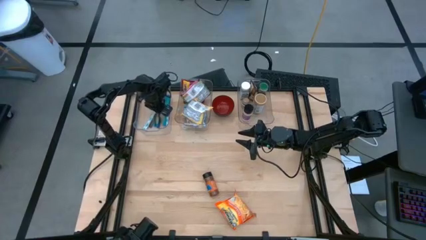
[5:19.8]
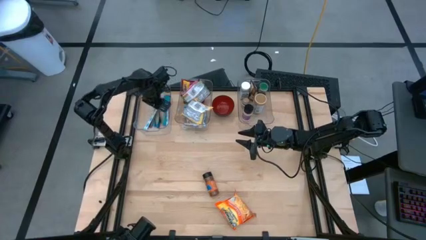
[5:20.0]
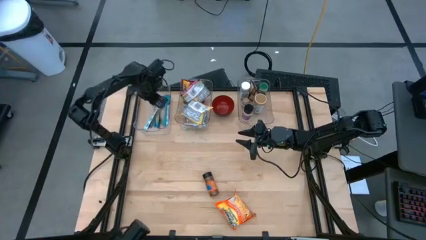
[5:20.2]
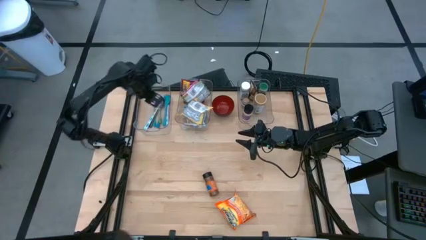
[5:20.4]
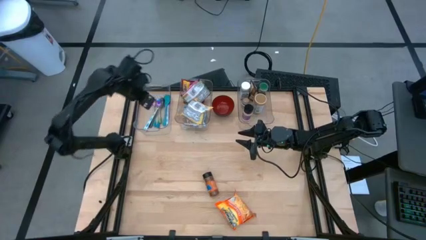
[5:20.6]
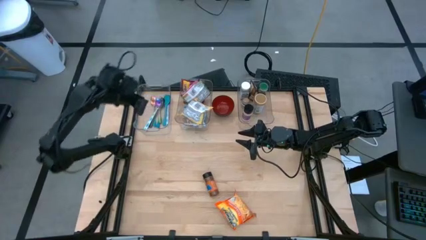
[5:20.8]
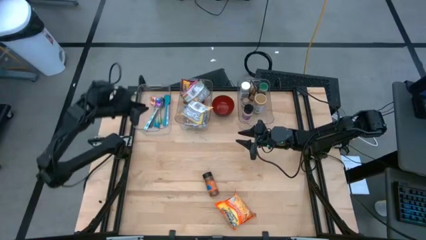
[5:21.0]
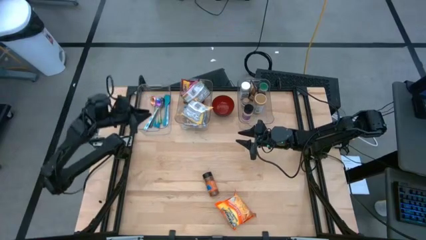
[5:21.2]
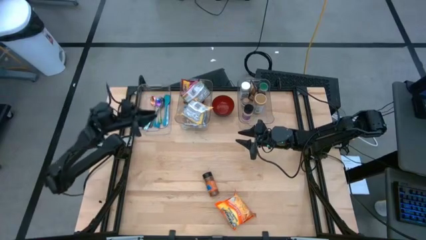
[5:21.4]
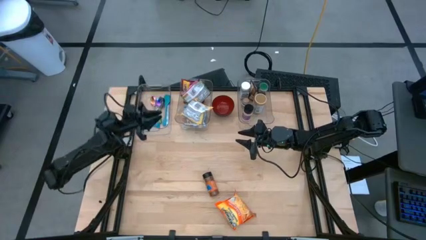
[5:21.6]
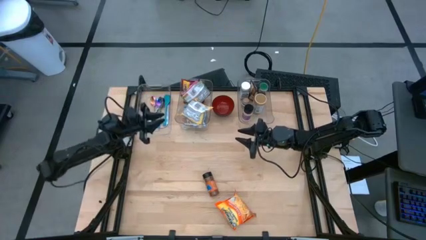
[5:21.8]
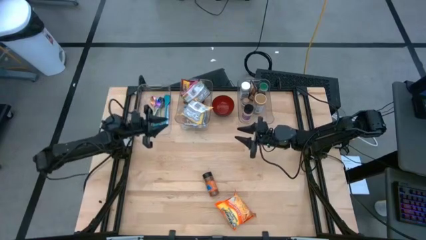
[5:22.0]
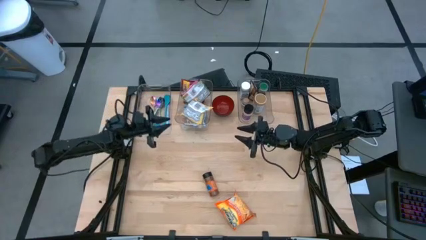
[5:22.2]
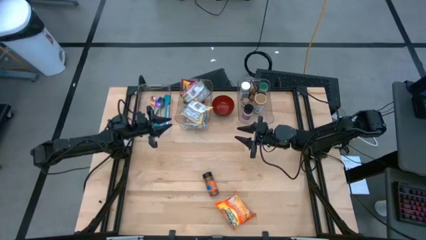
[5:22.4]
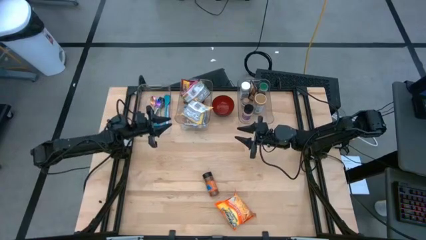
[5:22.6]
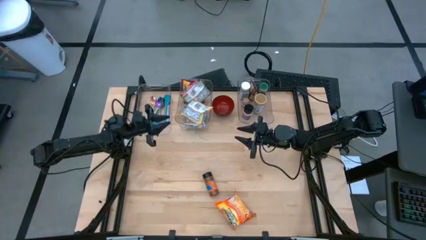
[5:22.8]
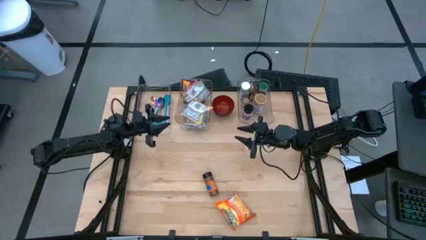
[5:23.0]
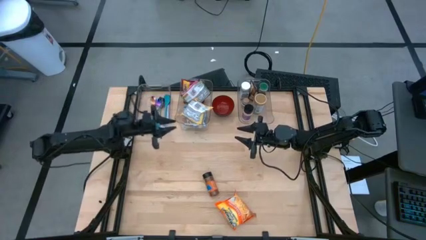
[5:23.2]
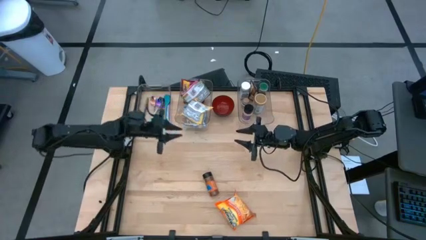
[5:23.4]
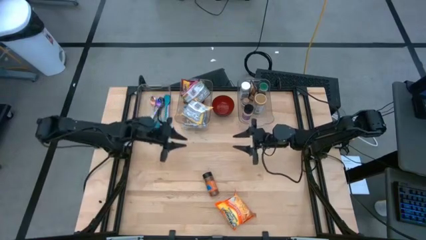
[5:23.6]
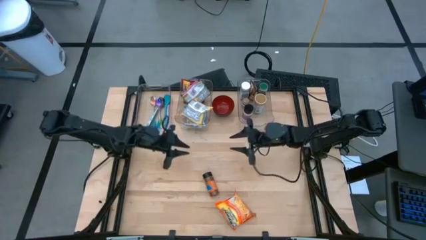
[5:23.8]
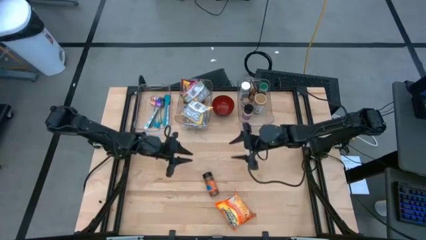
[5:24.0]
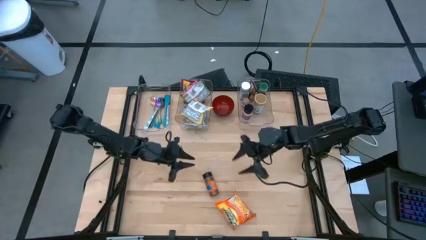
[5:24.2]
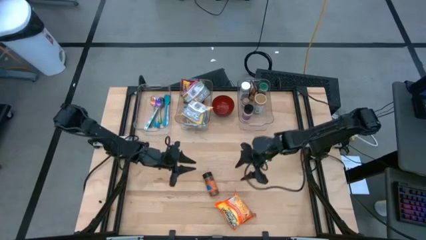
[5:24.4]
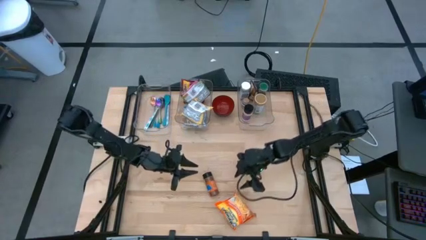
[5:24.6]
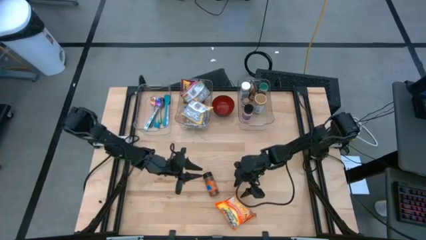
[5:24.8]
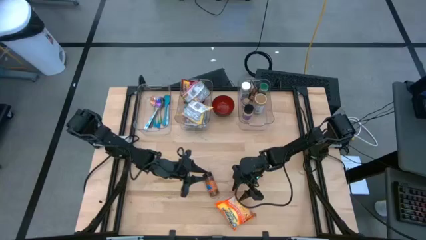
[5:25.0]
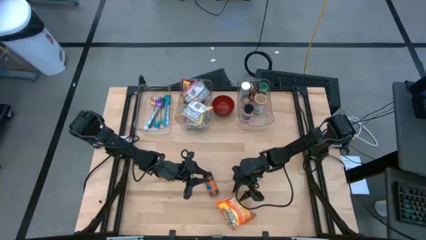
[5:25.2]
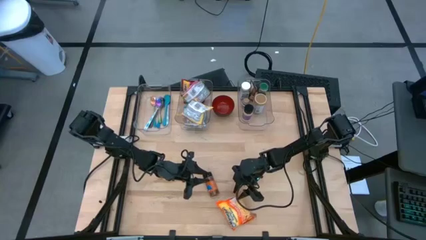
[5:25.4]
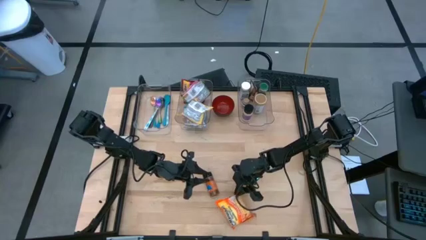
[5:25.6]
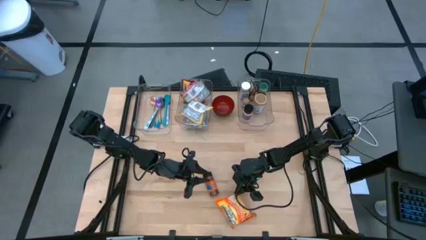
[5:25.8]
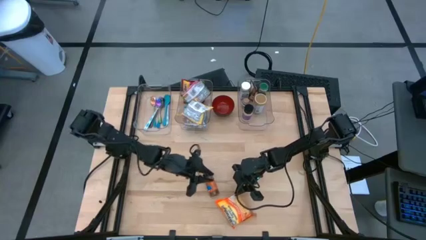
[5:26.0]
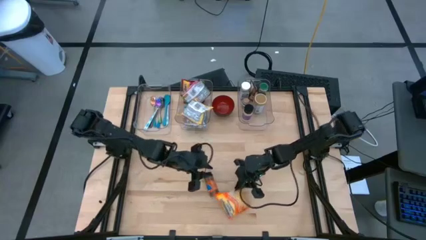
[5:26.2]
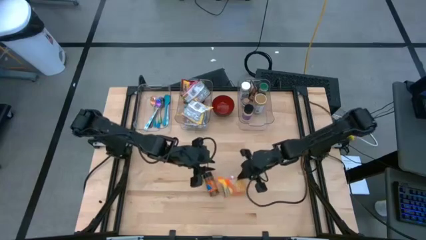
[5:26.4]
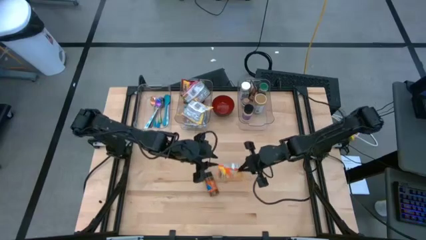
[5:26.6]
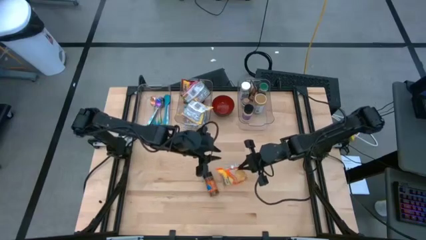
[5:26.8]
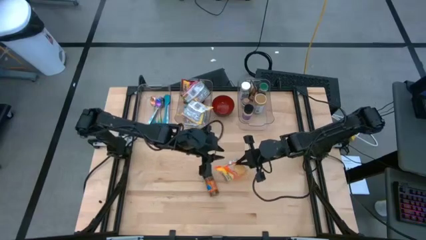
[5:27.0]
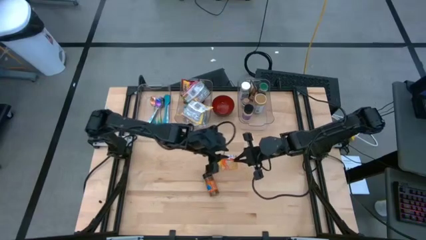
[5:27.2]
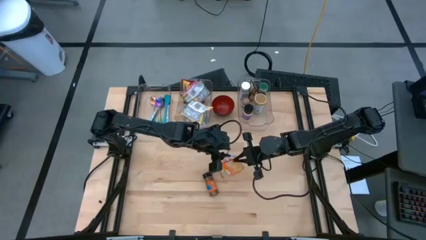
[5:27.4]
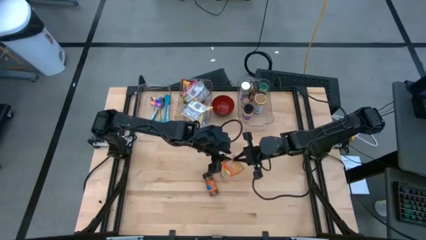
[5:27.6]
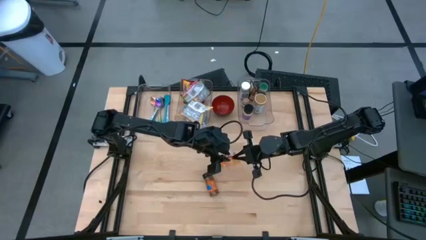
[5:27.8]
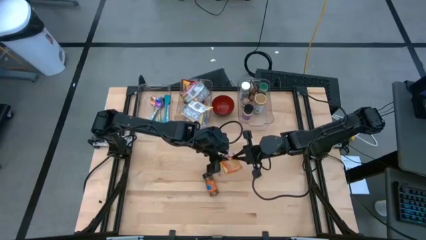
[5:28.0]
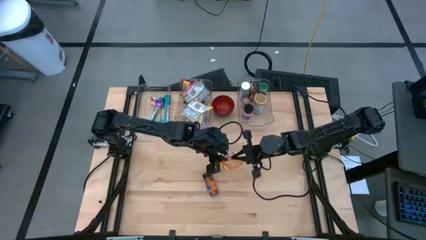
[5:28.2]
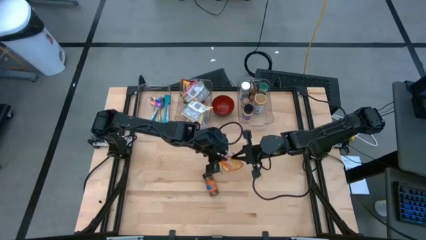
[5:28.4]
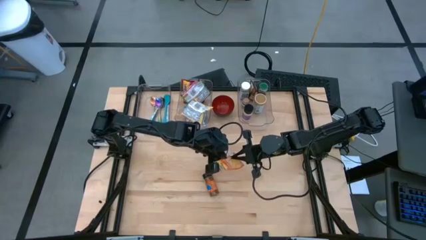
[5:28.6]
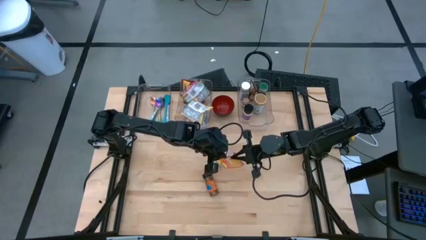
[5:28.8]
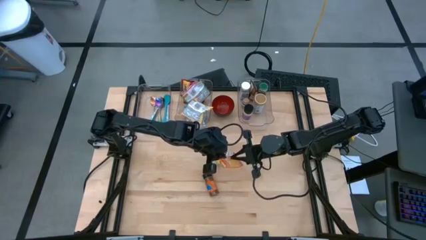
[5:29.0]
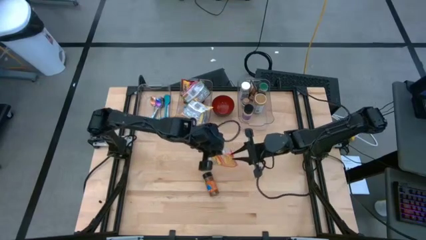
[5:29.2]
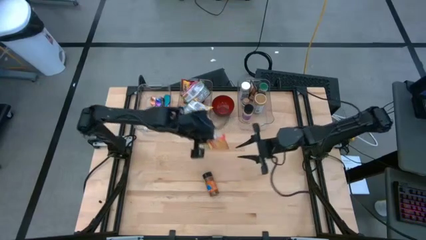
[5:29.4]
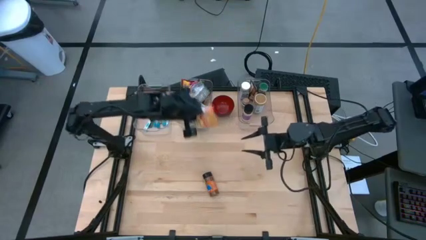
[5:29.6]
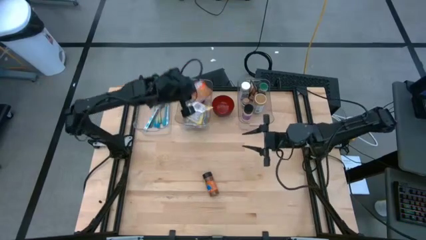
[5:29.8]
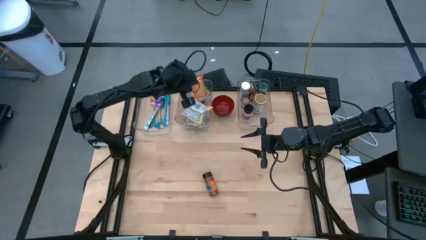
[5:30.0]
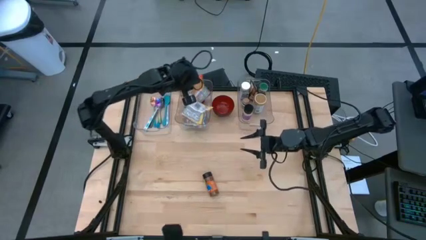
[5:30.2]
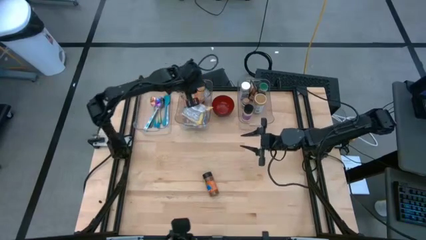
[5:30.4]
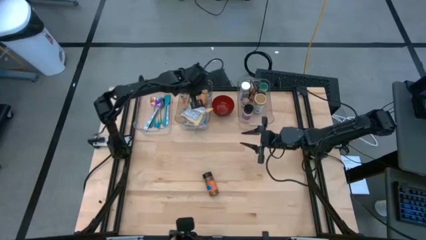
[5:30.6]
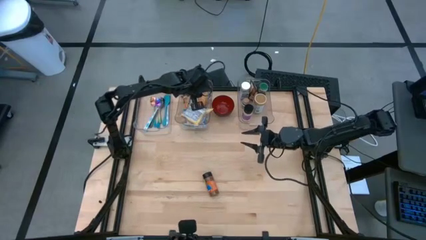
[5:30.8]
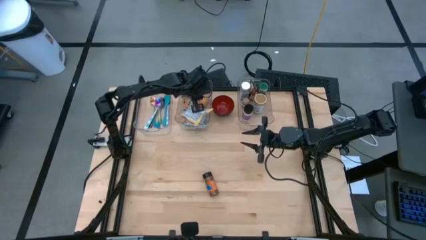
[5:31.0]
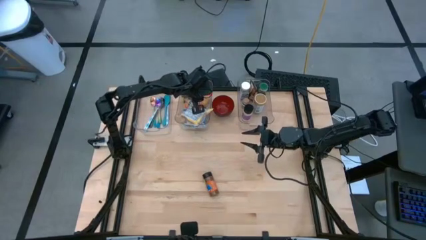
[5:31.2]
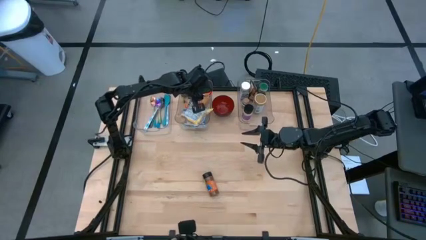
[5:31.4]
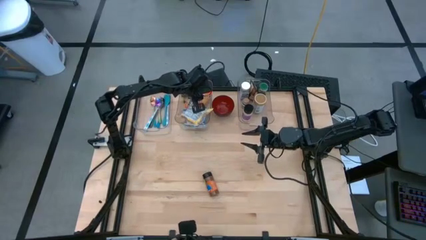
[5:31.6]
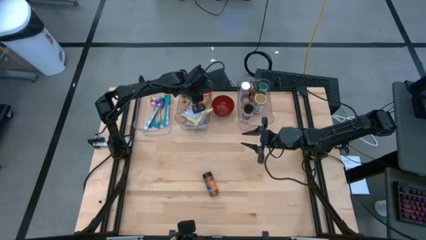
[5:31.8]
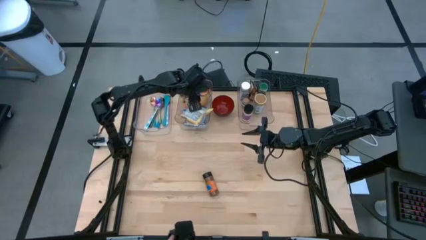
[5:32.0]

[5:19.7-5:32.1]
Task: Pick & Place Food Item
Put the orange noodle pack into the middle transparent bin

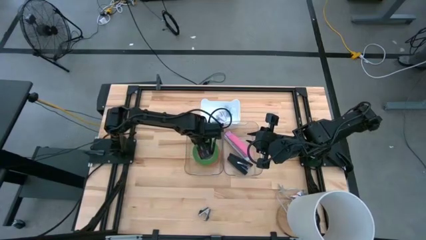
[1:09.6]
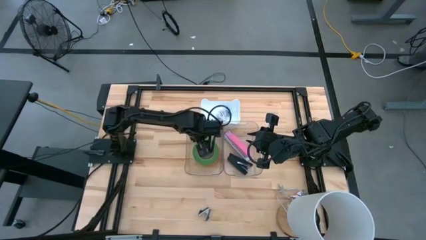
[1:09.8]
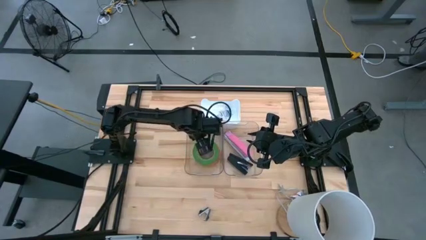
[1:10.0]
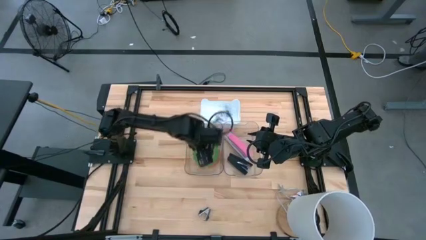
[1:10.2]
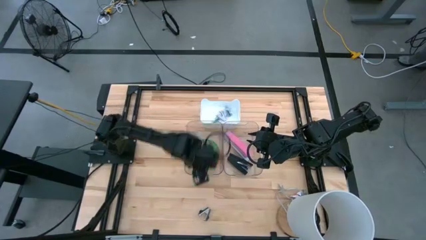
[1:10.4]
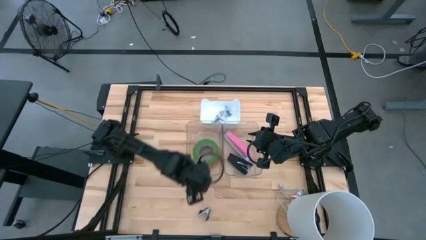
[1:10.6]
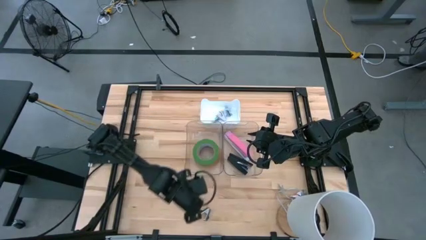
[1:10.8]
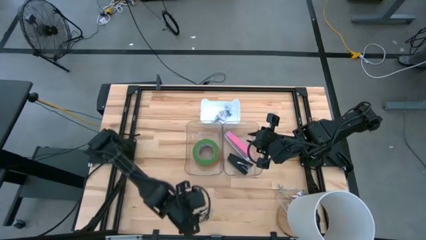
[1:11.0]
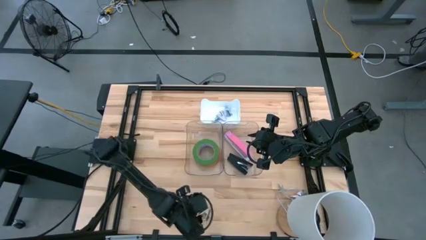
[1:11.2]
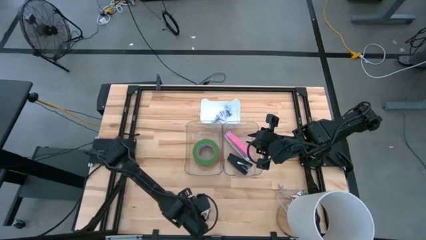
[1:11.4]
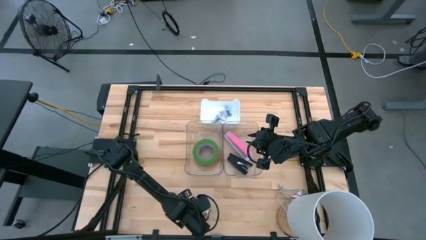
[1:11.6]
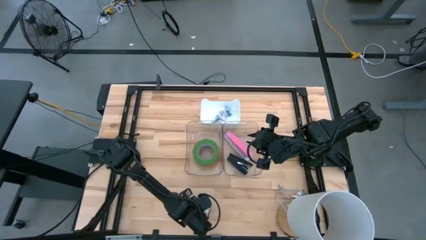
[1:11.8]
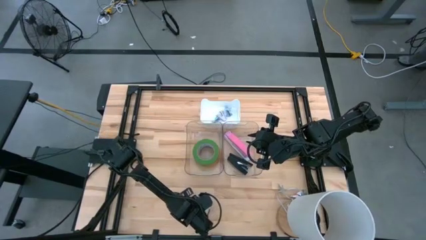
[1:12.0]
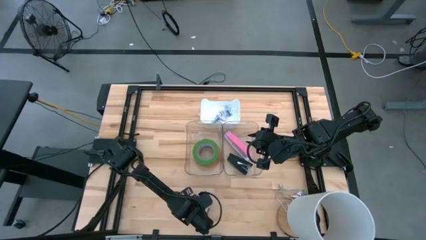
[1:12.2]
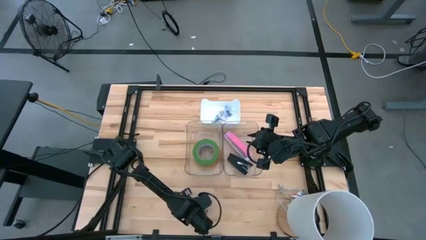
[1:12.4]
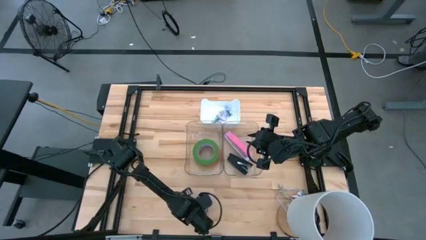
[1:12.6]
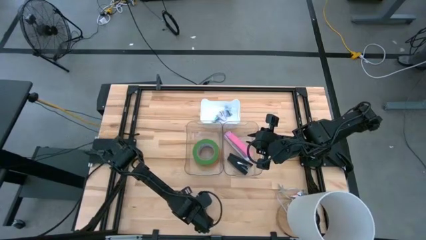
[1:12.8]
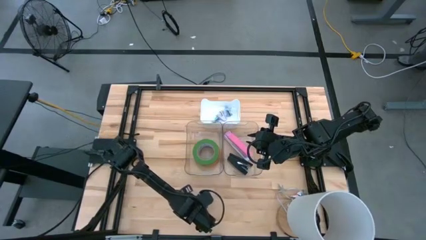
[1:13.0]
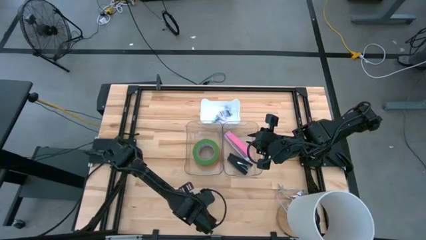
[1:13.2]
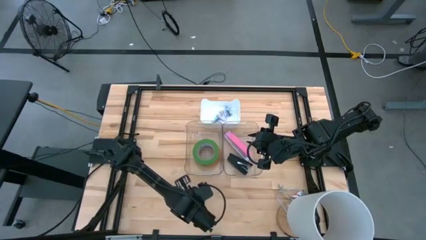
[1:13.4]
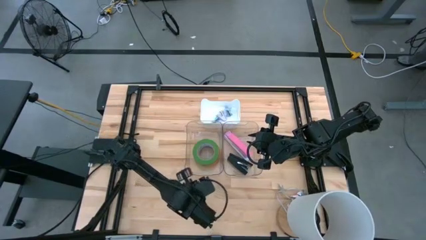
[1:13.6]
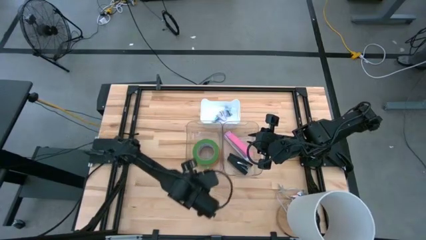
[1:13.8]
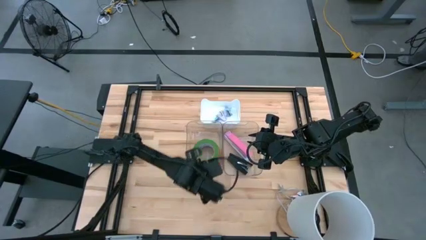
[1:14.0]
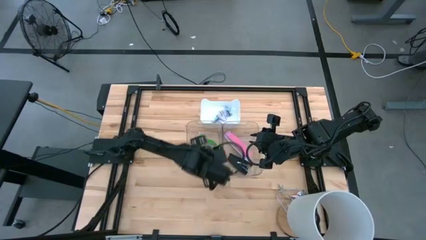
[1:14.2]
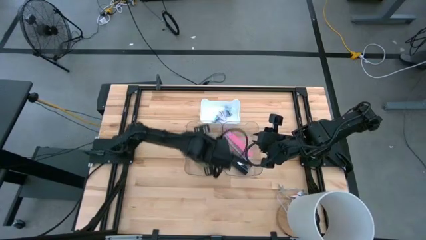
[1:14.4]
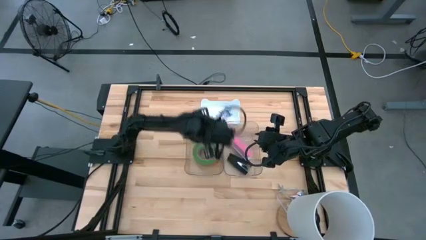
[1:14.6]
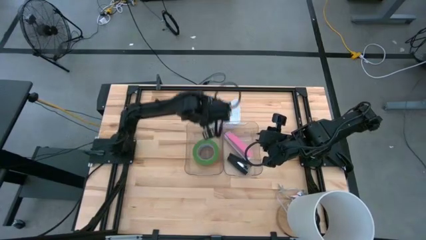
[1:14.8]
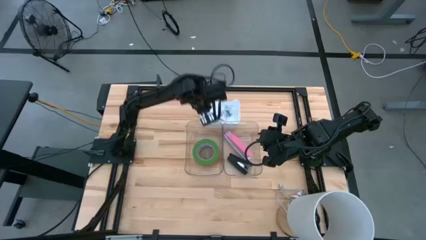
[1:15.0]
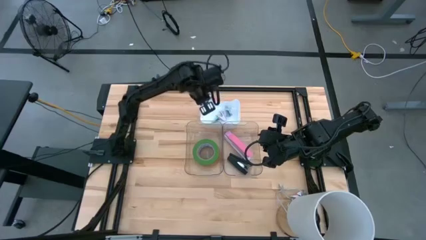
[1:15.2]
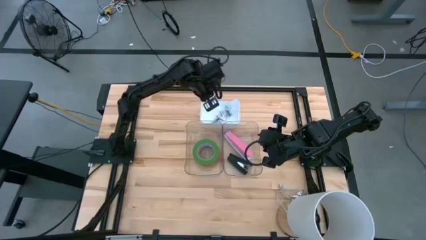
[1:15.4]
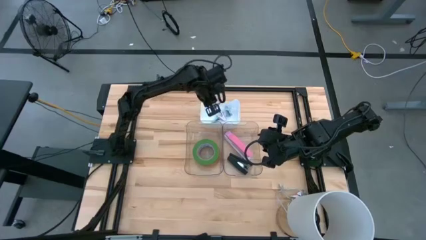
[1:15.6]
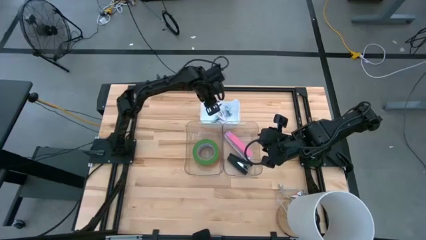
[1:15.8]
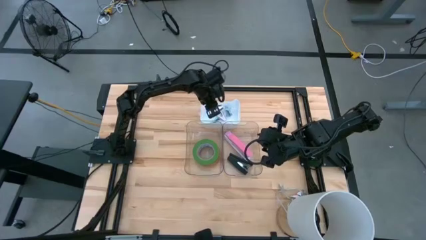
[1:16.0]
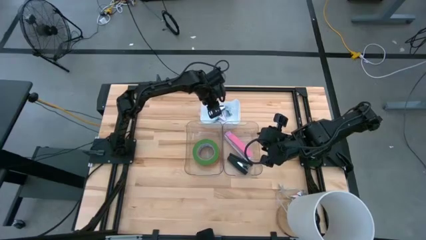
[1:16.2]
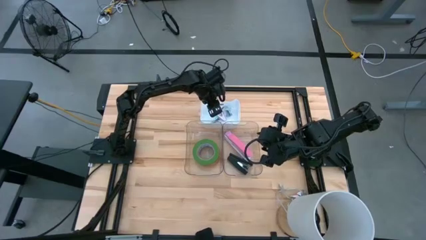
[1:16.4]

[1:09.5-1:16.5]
Task: Pick and place Stapler, Stapler remover, tape
Put the black staple remover into the white bin
